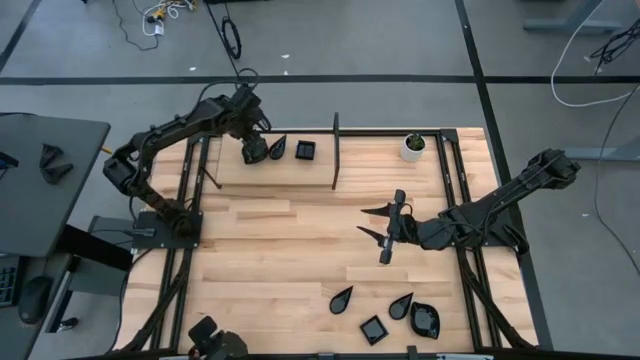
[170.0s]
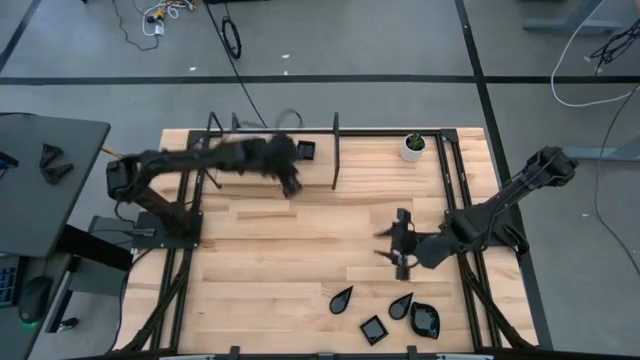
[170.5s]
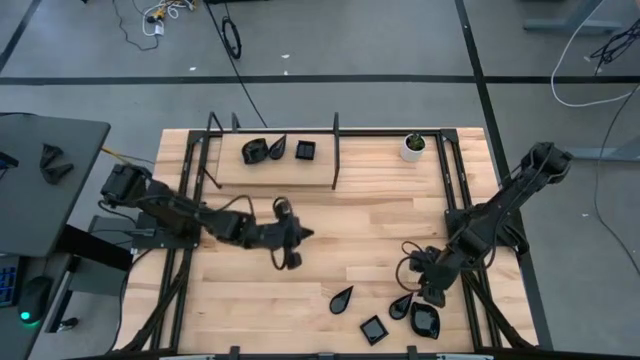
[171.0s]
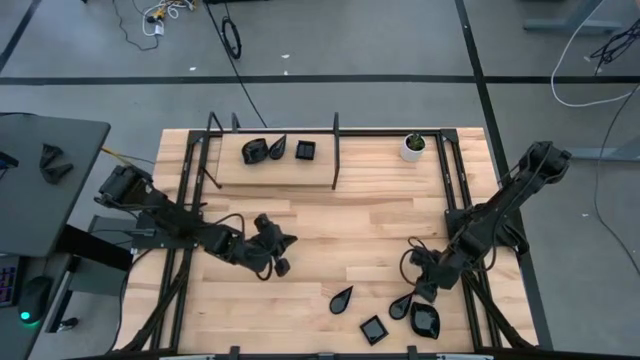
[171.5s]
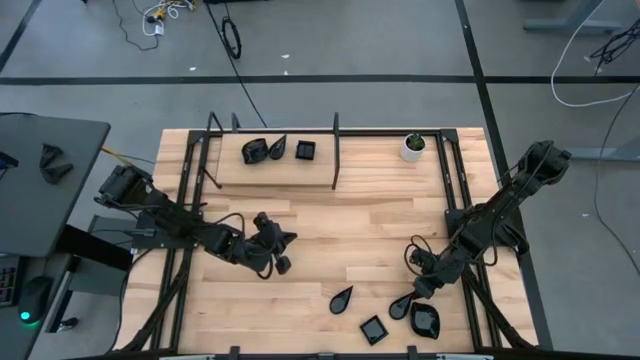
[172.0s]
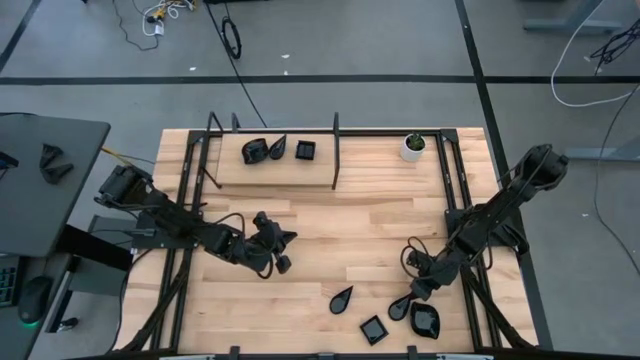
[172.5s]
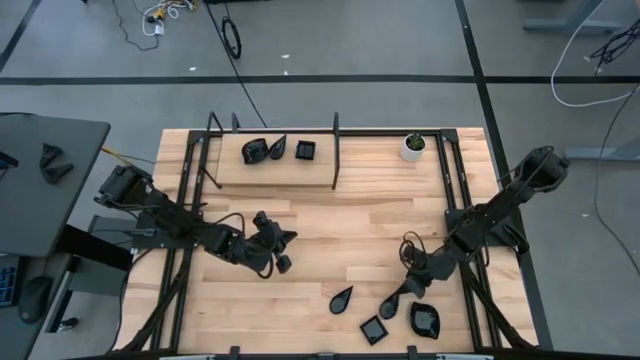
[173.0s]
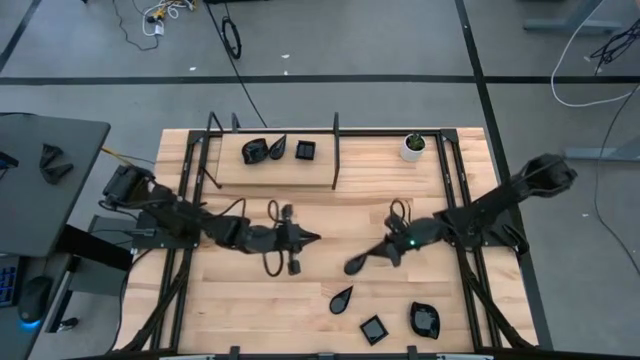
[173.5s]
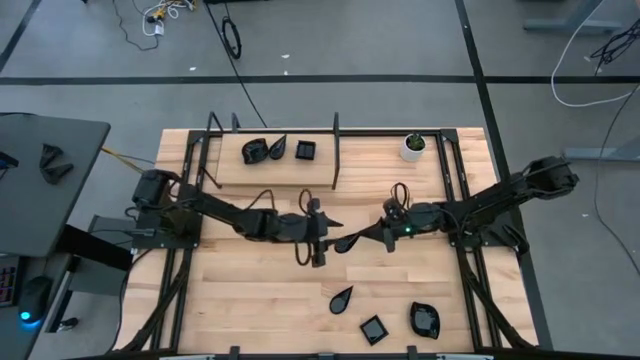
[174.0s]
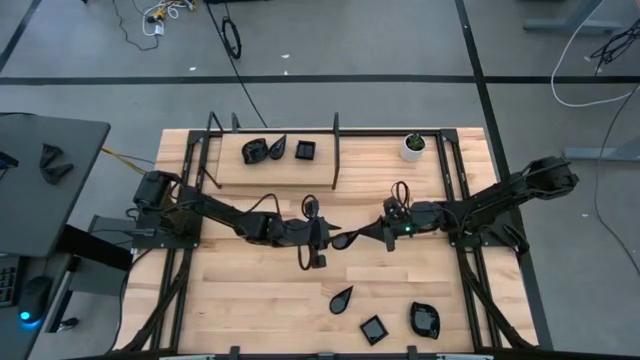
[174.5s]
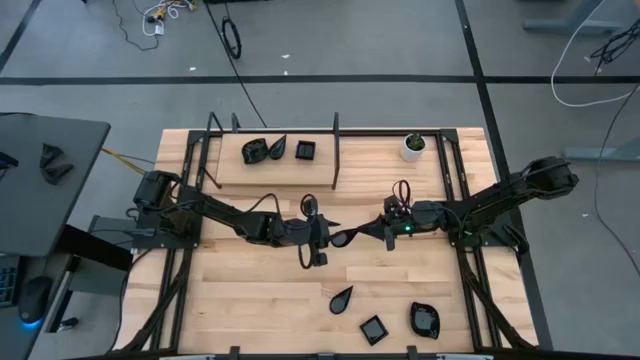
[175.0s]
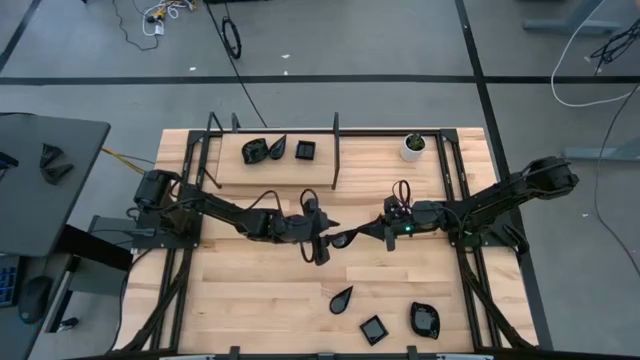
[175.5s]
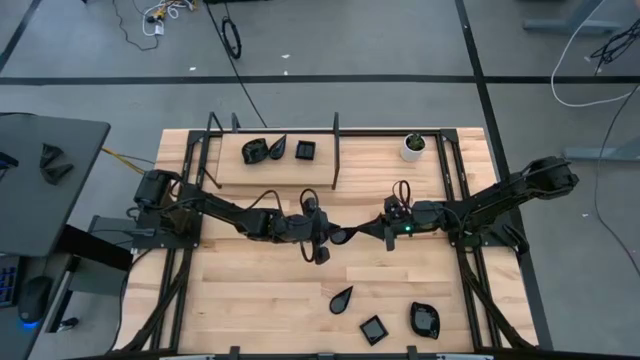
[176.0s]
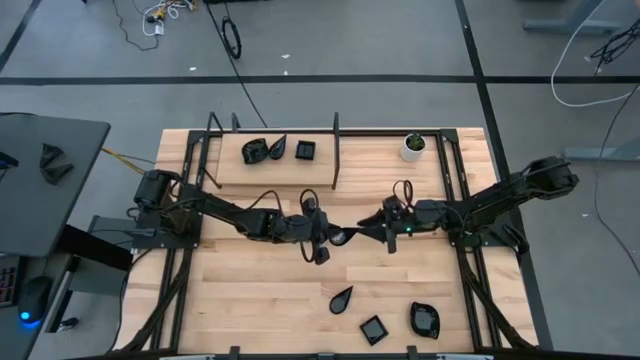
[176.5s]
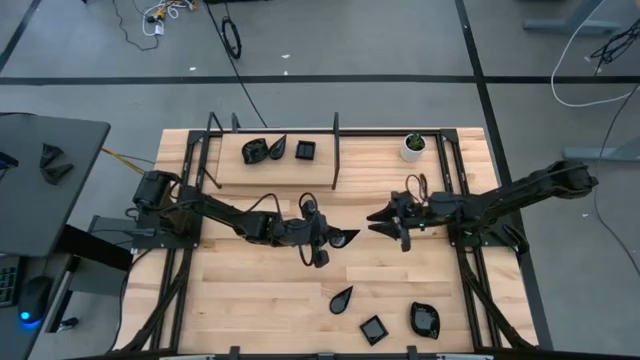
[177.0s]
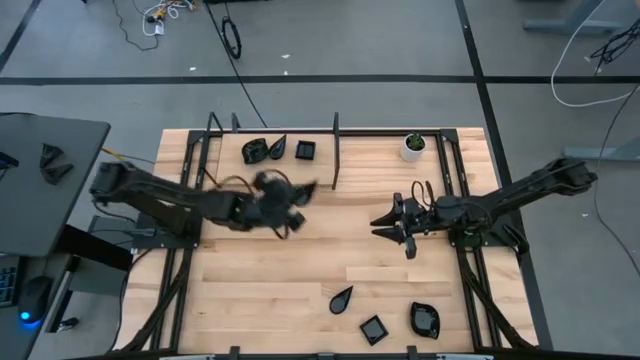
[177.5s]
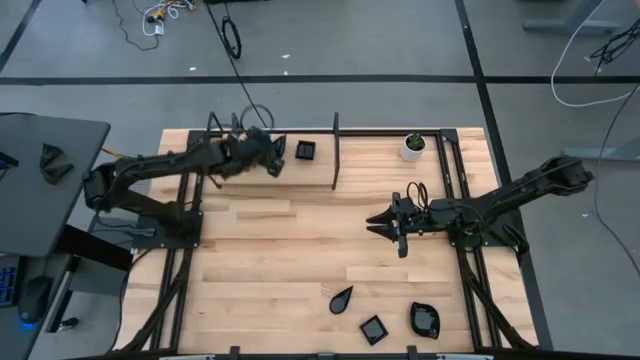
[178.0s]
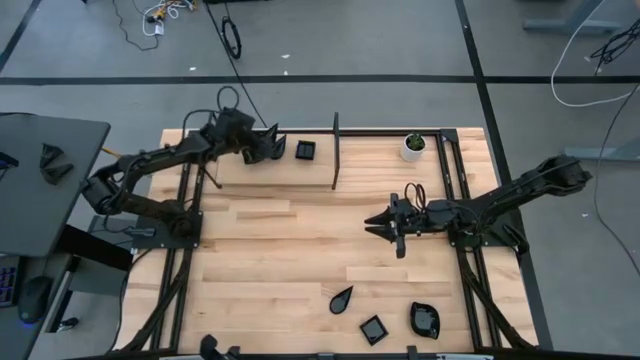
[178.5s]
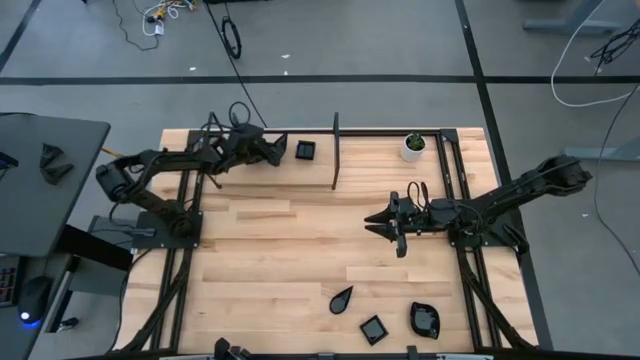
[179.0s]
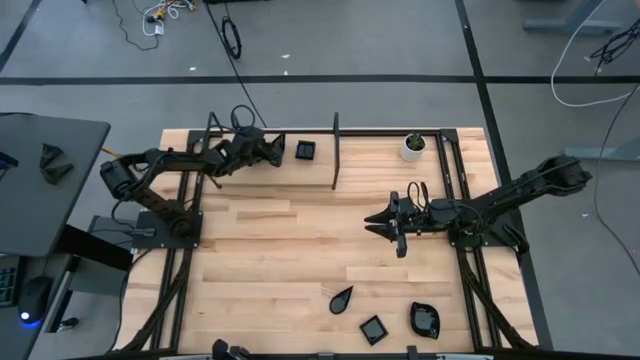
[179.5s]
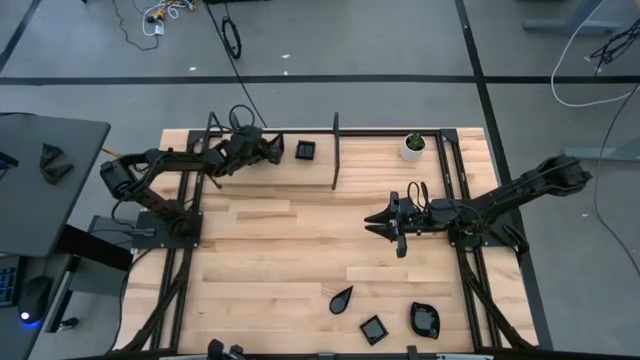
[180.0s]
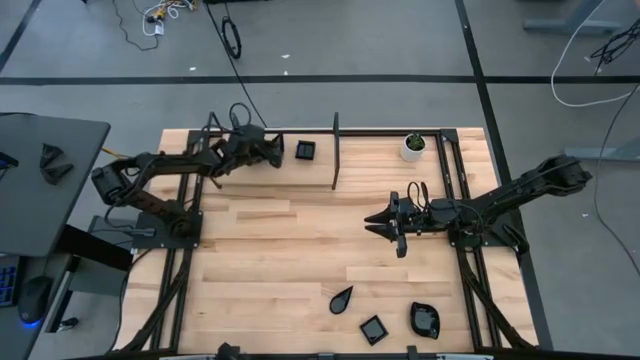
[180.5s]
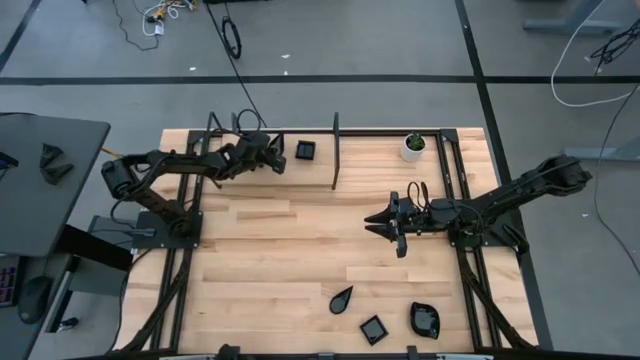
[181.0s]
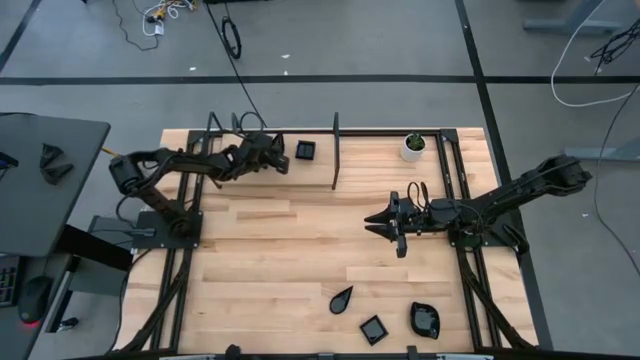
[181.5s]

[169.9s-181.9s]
Task: Pick & Place Mini shaped plates
Stack the black drop-shaped plate on top of the stacked black drop-shaped plates on the shelf

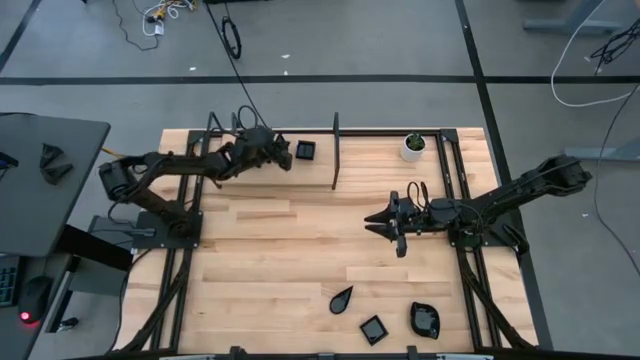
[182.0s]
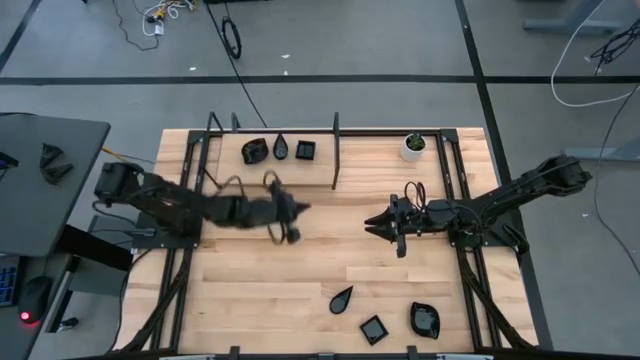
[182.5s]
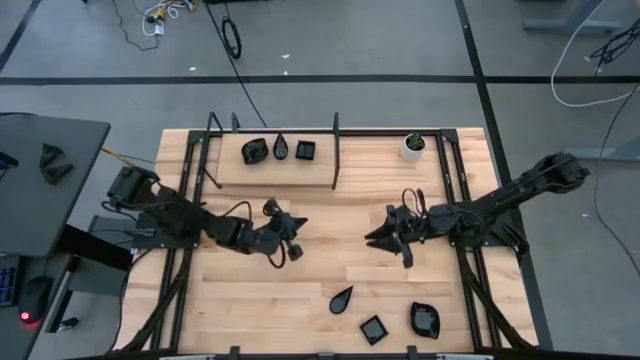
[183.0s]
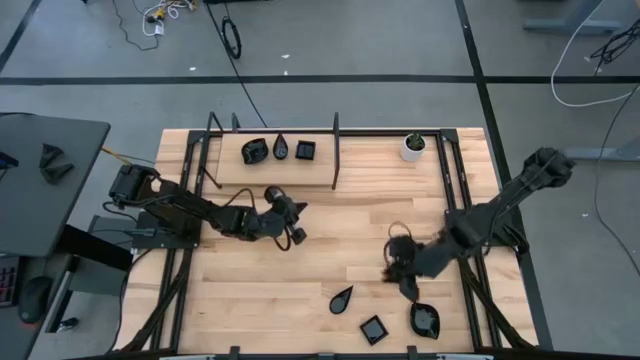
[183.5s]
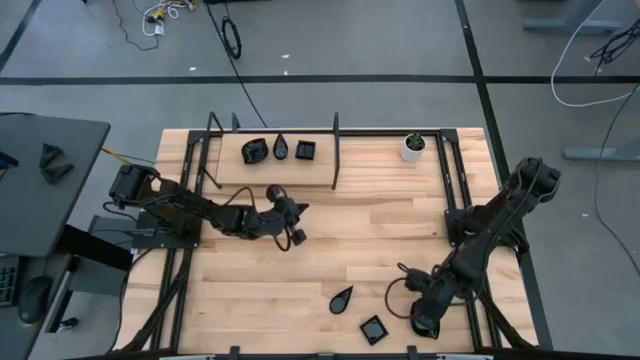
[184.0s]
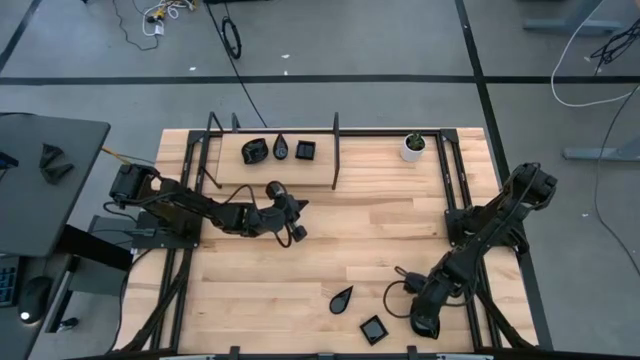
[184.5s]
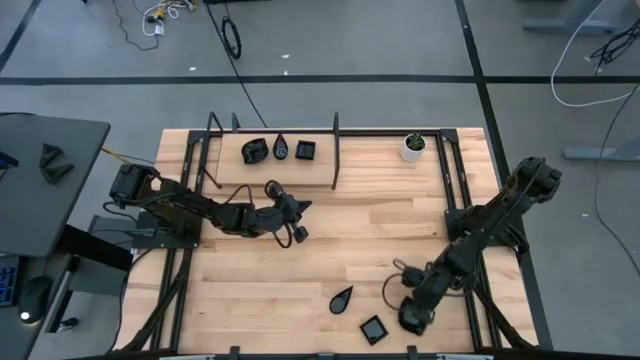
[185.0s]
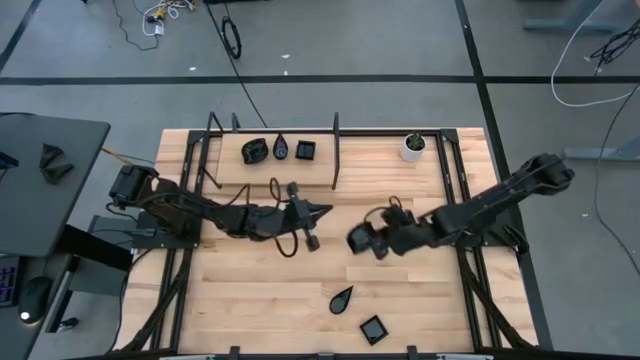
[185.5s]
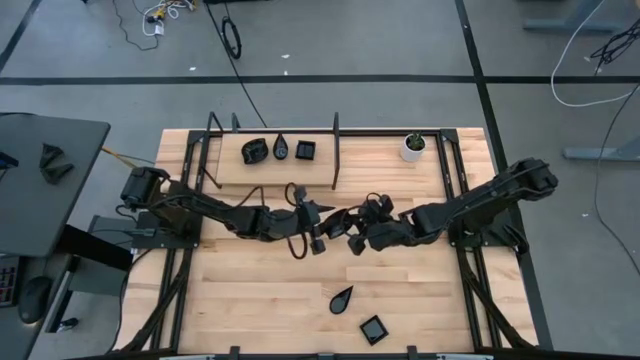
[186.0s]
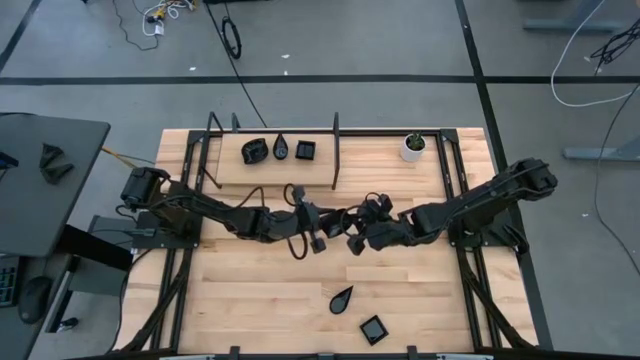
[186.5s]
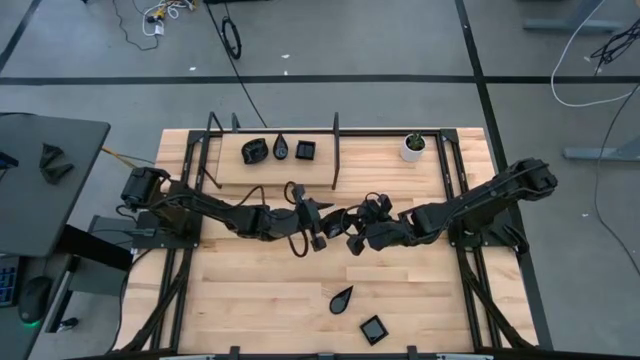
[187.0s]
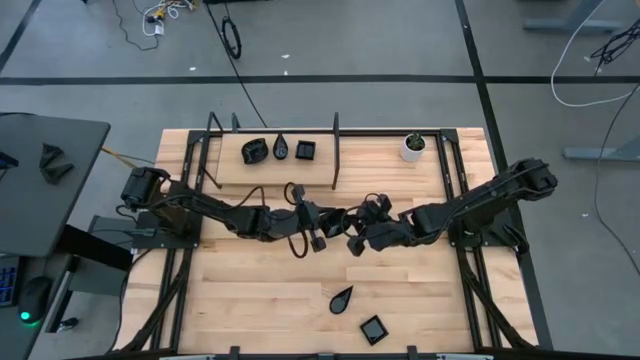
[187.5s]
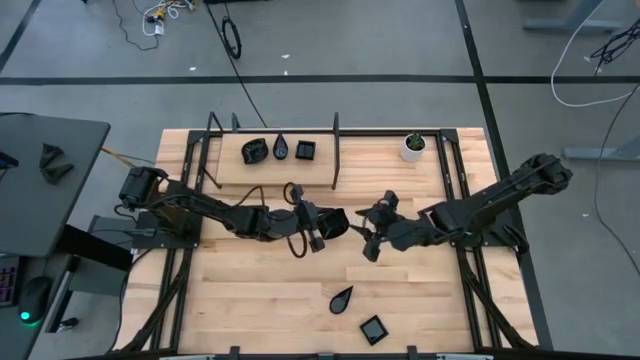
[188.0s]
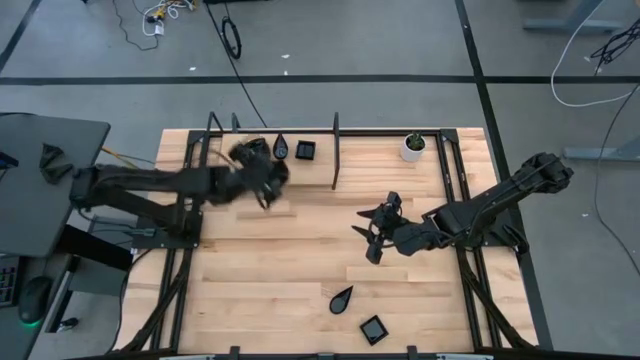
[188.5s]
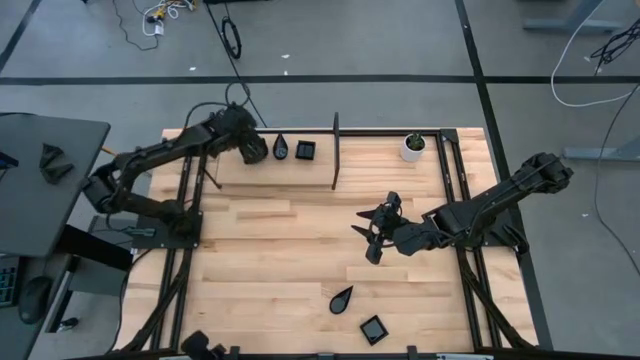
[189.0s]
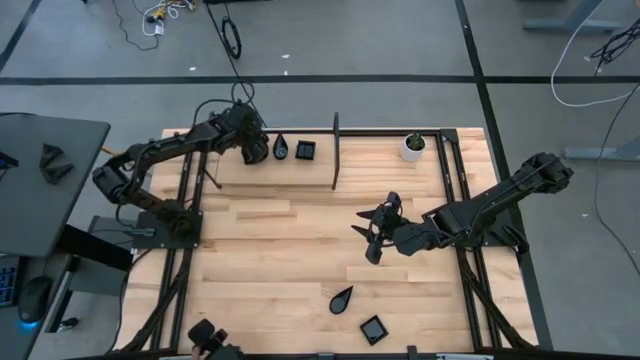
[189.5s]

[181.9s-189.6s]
Stack the black leaf-shaped plate on top of the stacked black leaf-shaped plates on the shelf

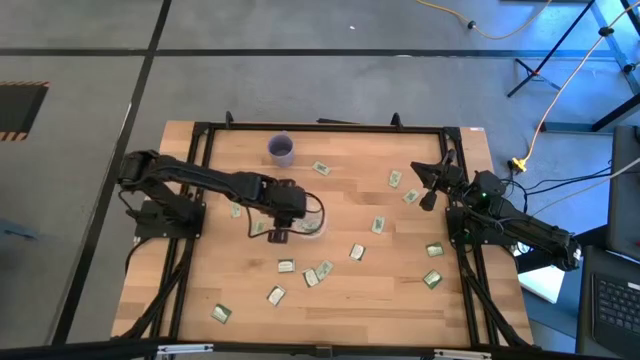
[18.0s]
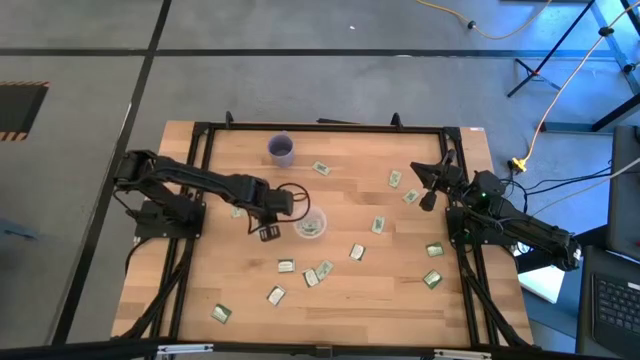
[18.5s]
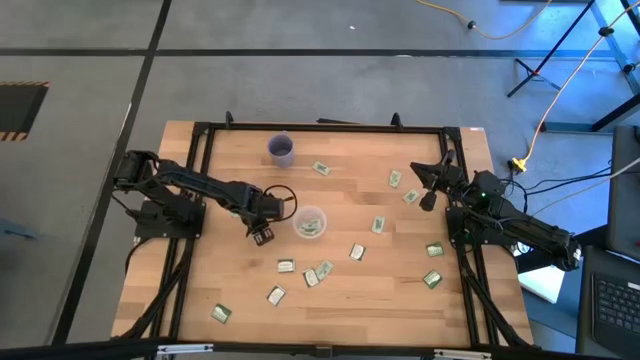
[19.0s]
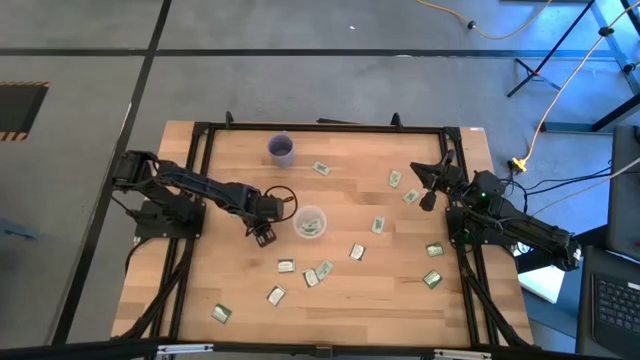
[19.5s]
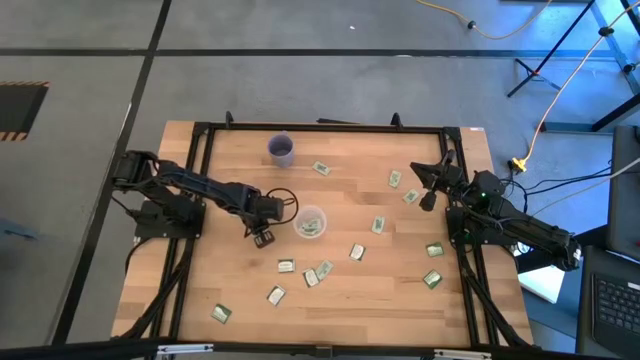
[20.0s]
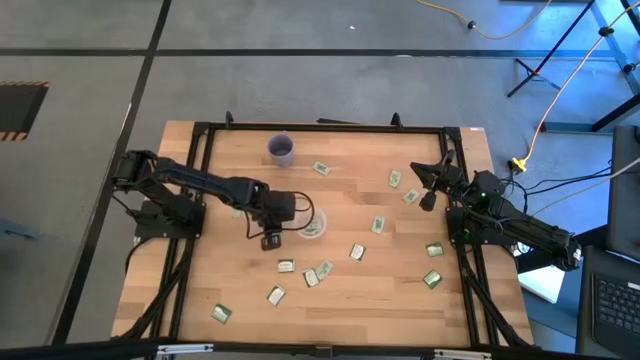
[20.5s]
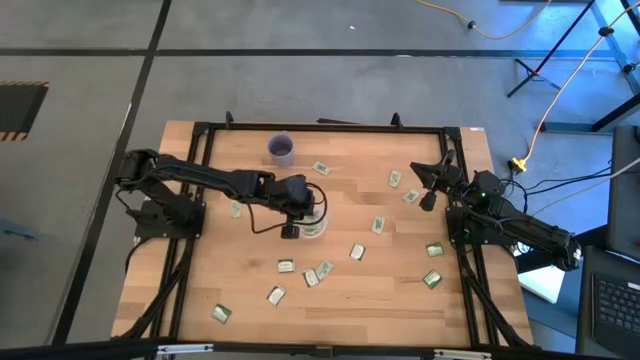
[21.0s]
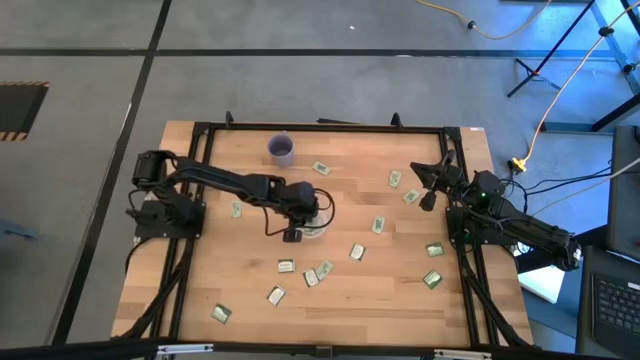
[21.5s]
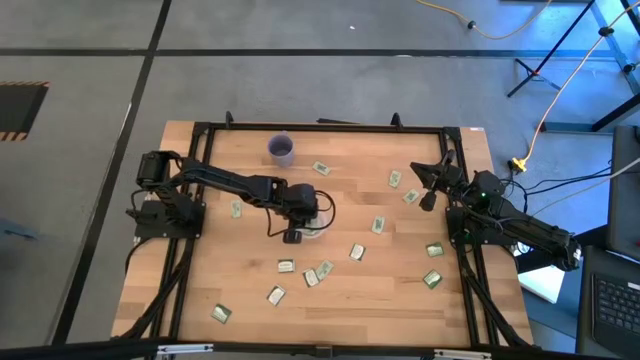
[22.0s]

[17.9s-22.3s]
Task: Pick and place Stevia / Truvia into bins
Put the stevia packet into the transparent container
